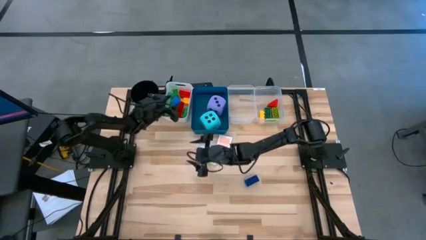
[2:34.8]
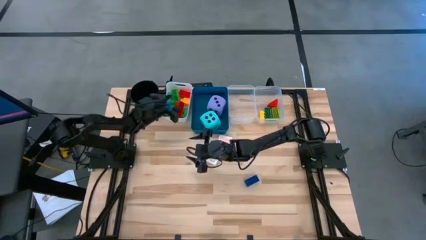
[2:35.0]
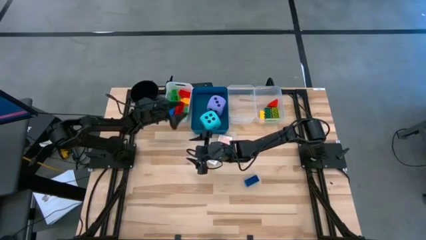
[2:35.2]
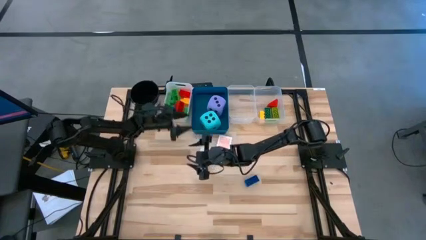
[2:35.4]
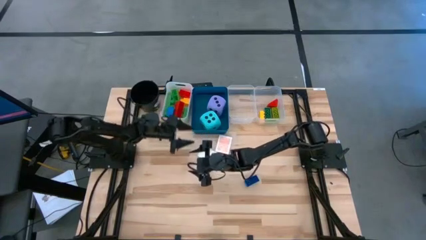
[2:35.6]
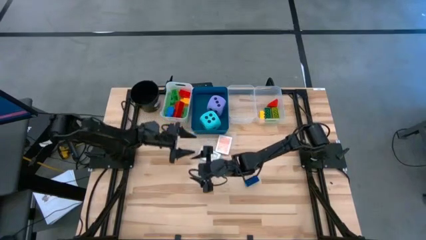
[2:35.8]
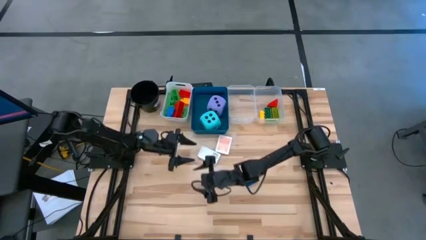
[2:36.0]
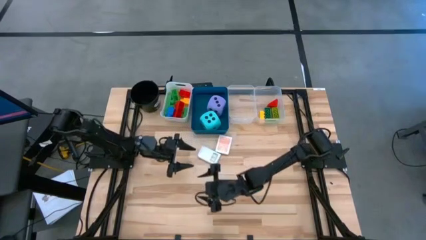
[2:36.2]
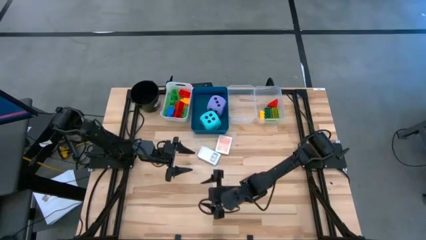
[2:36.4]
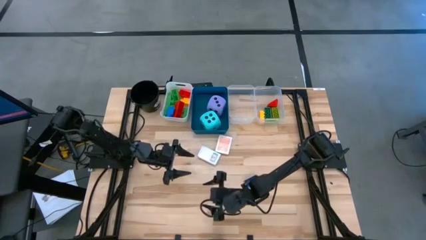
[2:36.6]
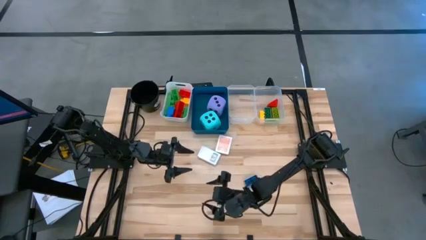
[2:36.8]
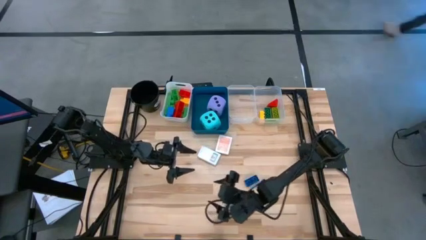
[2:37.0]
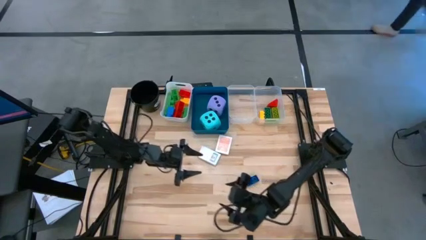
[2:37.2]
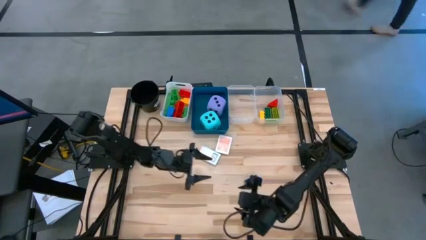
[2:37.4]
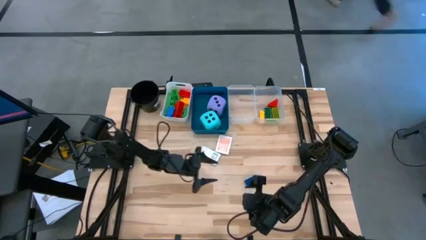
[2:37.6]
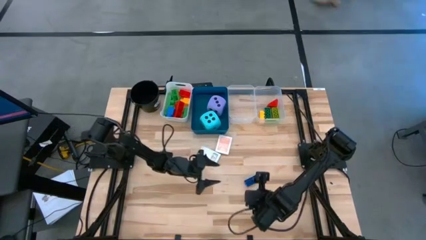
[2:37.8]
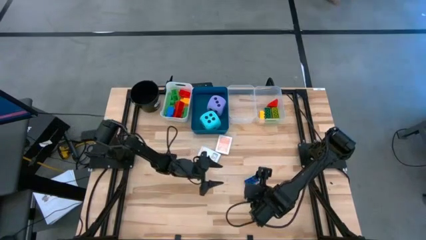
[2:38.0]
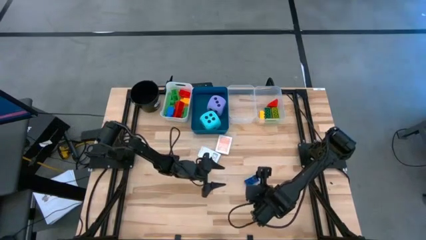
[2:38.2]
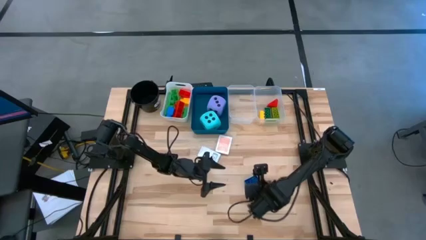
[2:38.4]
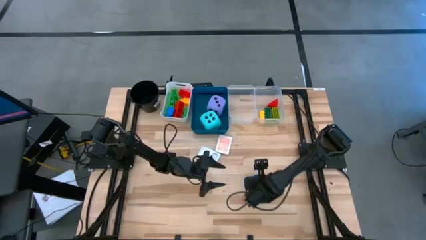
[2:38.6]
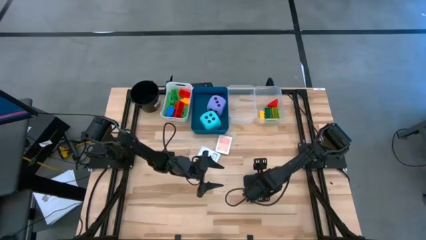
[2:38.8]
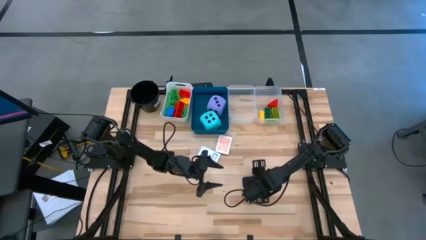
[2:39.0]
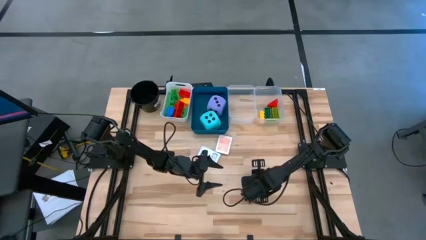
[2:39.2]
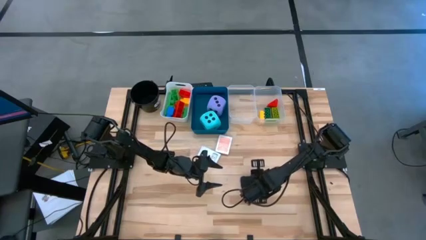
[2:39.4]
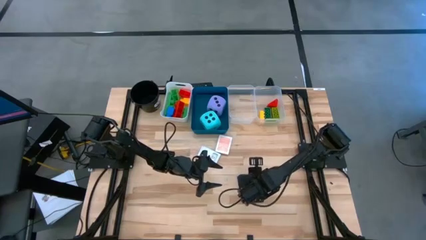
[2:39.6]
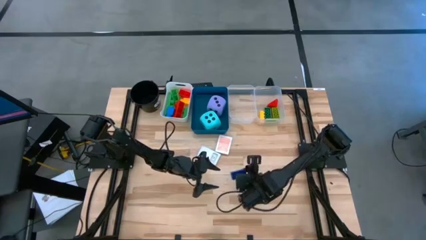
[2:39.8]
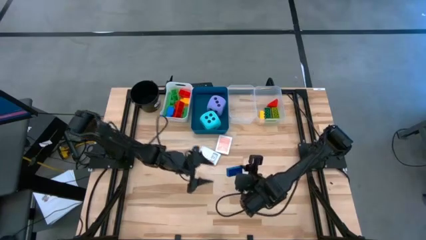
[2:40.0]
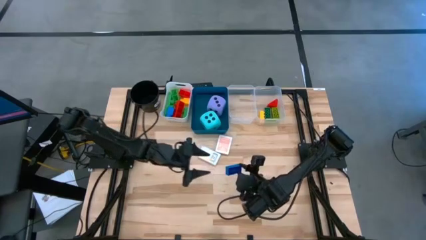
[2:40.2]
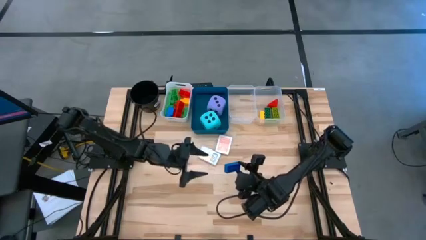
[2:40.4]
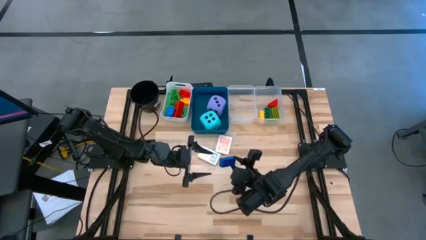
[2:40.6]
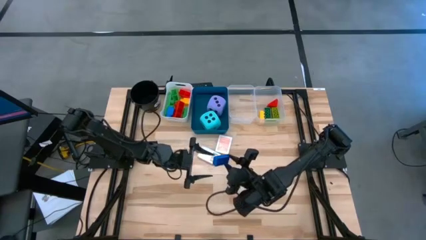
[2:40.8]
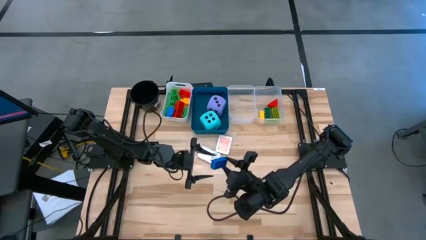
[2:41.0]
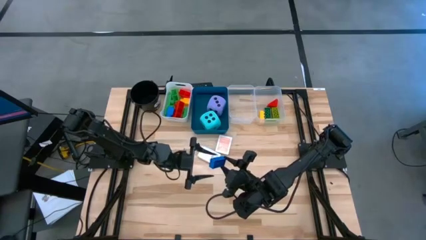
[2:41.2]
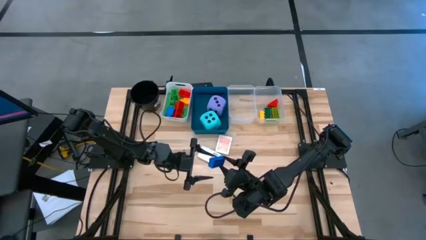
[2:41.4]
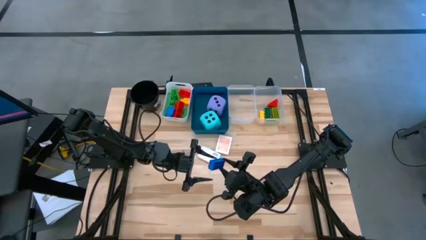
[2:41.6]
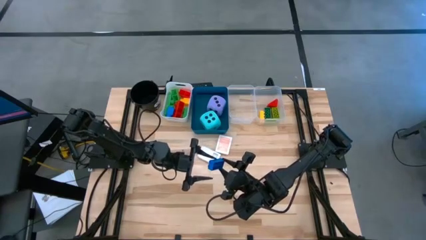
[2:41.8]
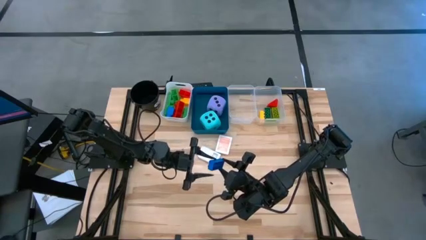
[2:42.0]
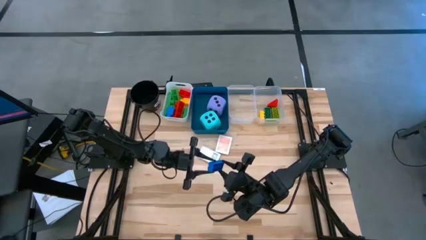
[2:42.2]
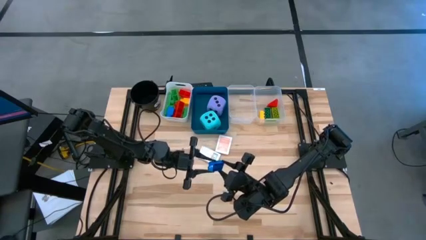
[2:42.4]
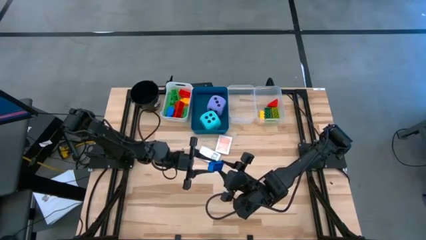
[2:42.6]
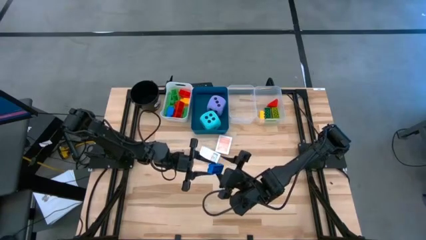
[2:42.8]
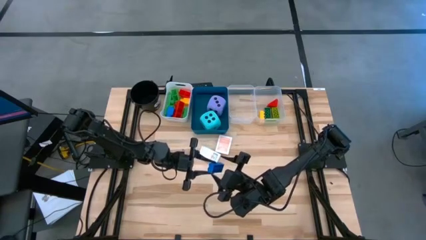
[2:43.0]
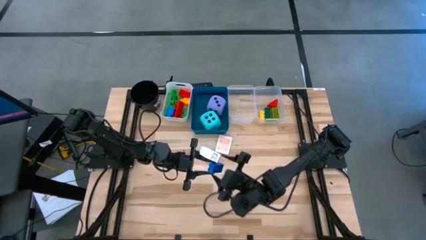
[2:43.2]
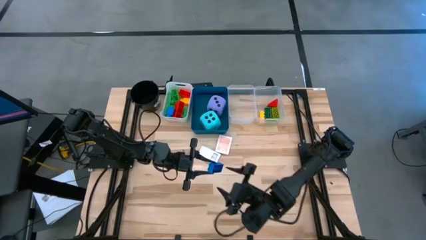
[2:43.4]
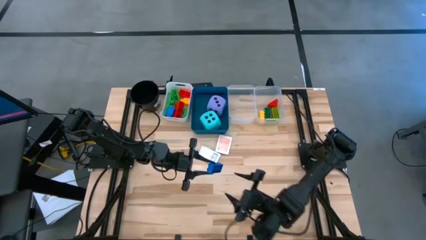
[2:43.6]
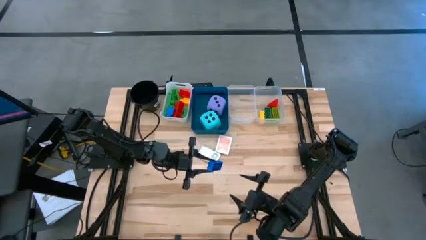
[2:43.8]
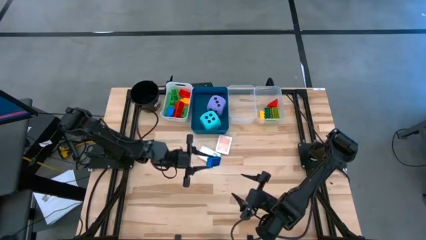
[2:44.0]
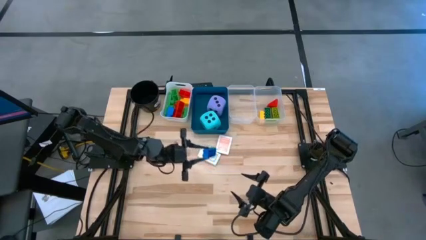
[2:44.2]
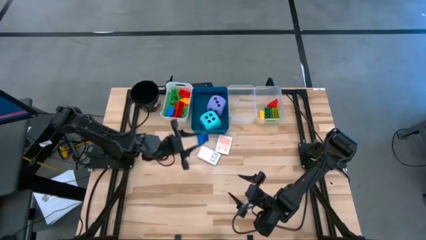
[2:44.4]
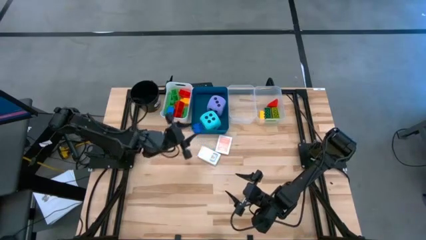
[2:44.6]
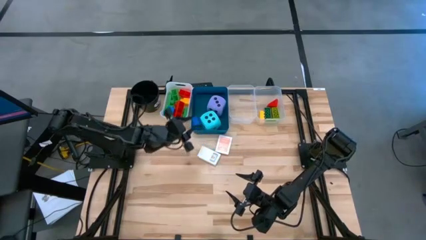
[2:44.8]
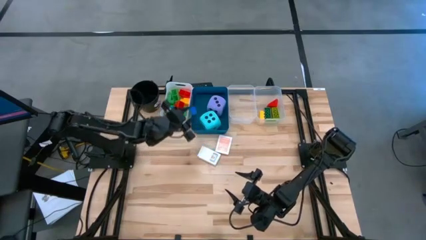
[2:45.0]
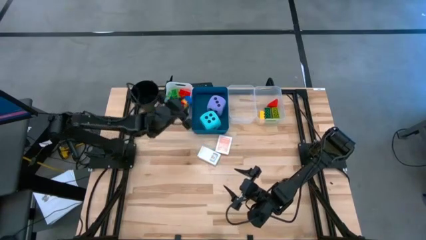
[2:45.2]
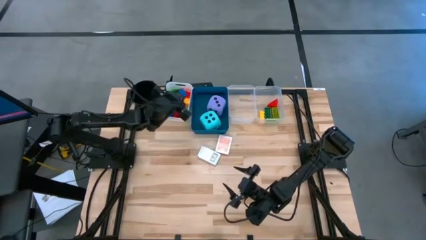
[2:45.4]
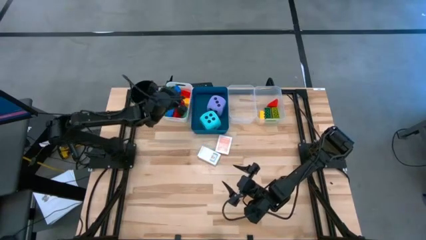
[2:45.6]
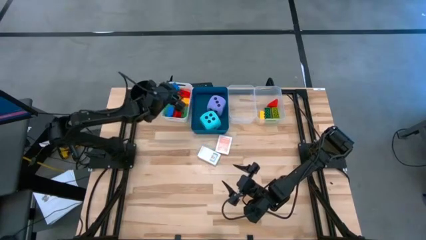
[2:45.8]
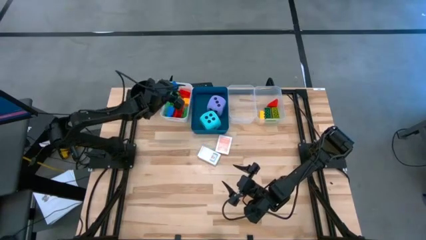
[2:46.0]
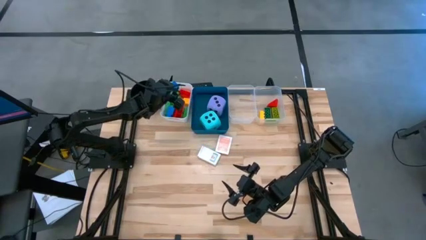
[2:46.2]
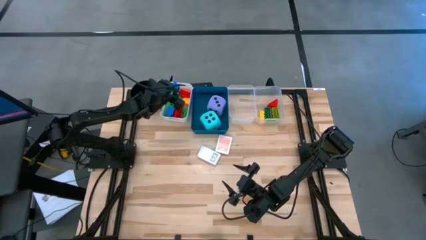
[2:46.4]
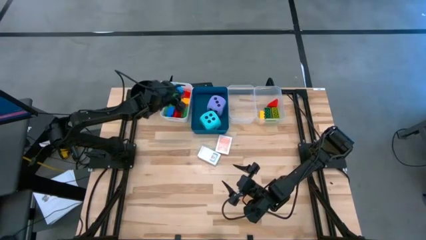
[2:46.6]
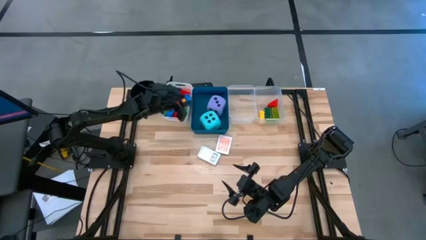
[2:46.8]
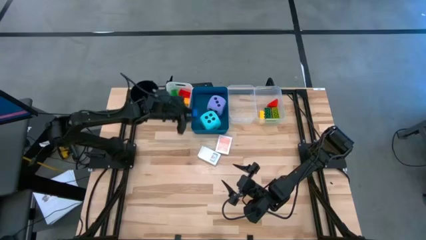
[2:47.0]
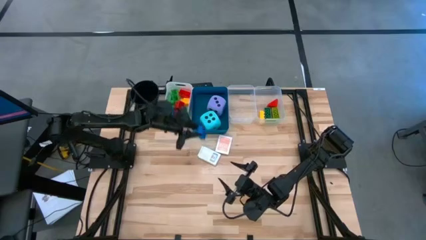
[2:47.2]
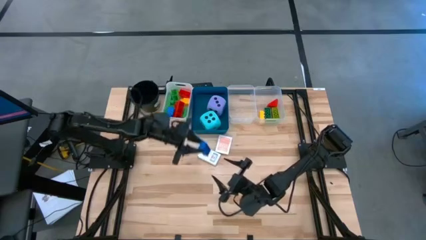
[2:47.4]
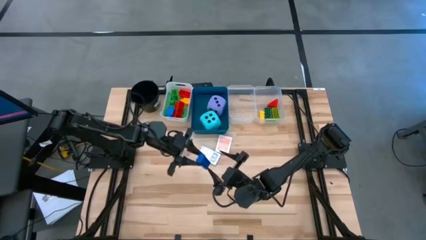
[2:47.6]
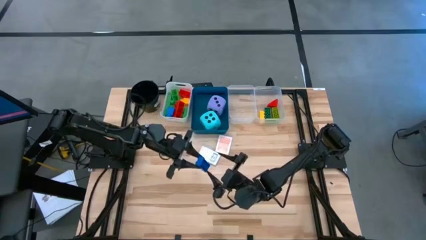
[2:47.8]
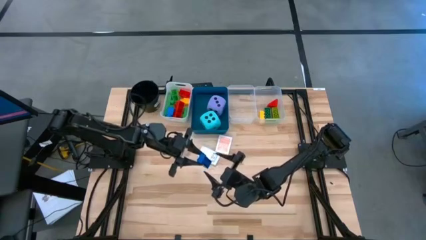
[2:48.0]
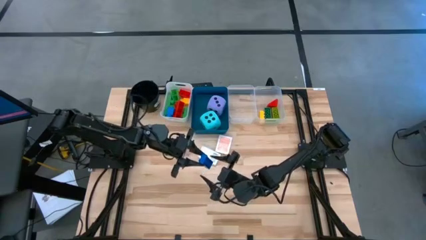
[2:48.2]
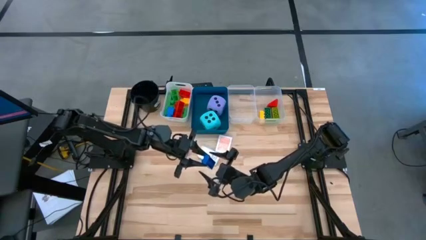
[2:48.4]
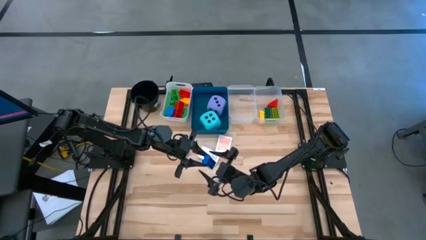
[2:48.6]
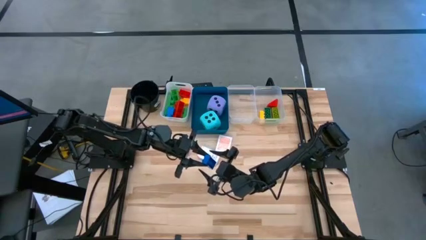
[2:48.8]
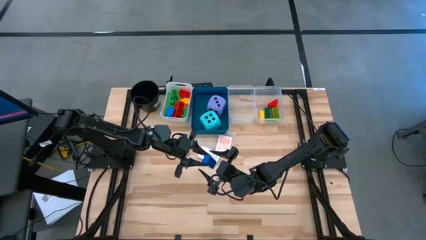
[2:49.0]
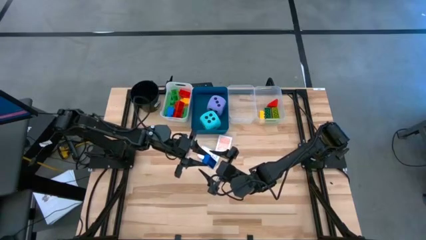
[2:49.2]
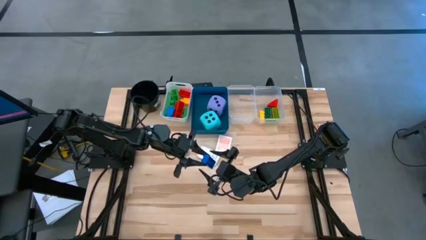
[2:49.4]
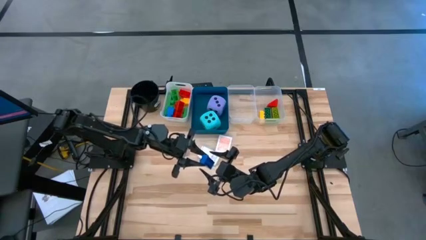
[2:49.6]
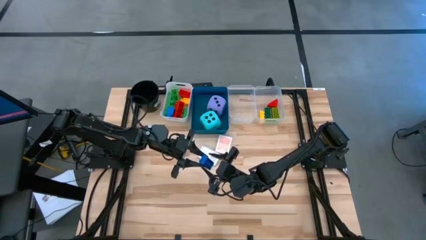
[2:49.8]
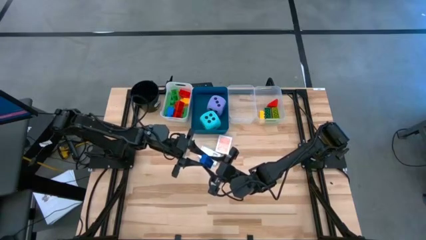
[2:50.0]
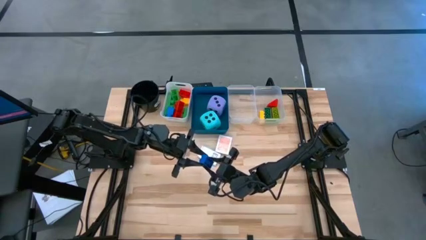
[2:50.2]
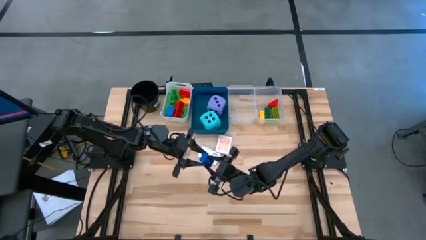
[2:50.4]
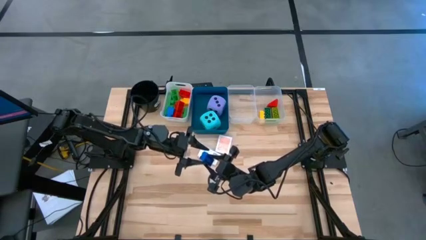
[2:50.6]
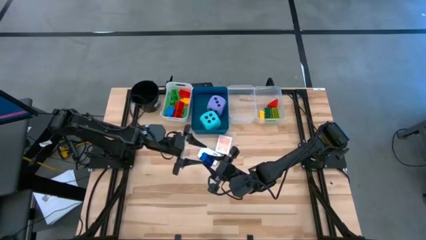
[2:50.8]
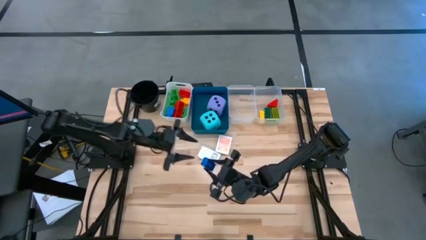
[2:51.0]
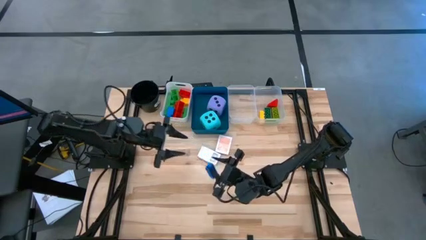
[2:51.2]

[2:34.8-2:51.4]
Task: Pick & Place Toys
Put the small dark blue game piece into the right transparent bin
